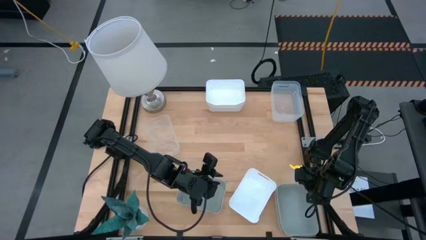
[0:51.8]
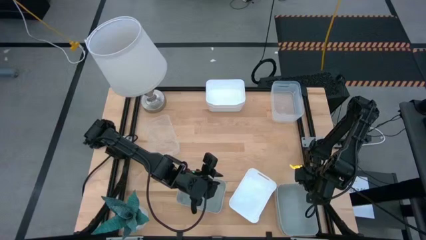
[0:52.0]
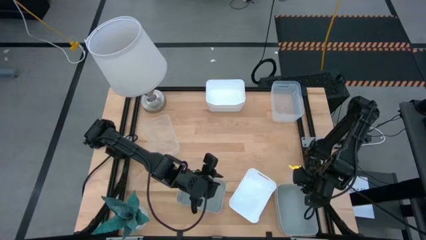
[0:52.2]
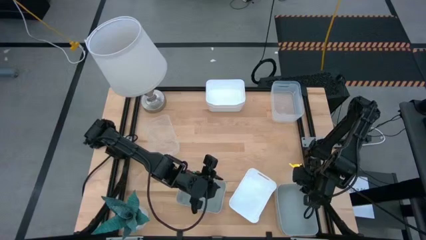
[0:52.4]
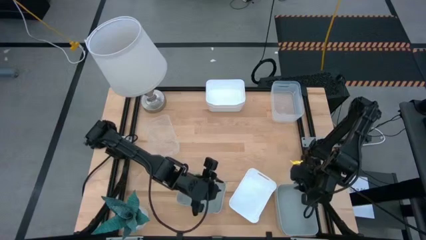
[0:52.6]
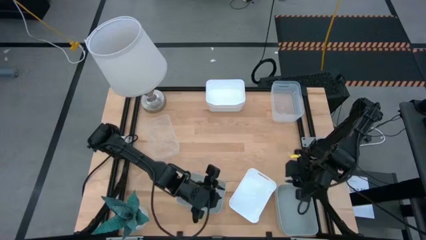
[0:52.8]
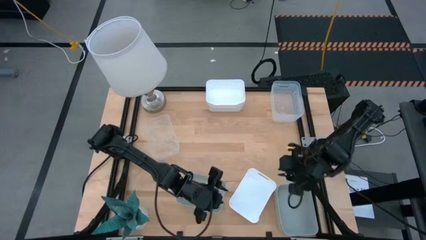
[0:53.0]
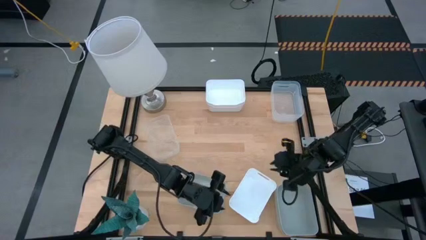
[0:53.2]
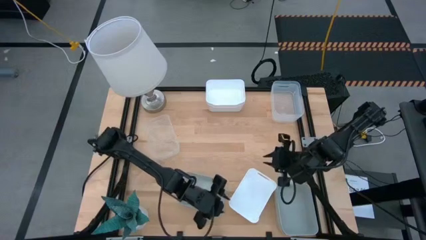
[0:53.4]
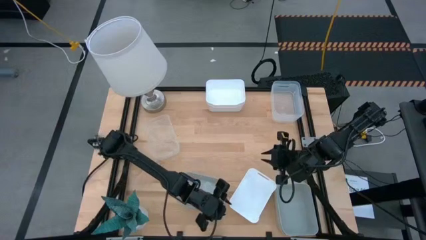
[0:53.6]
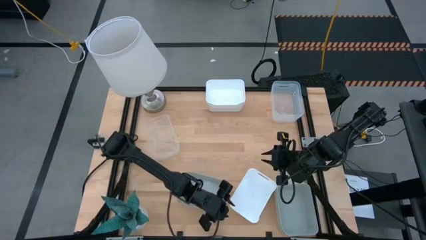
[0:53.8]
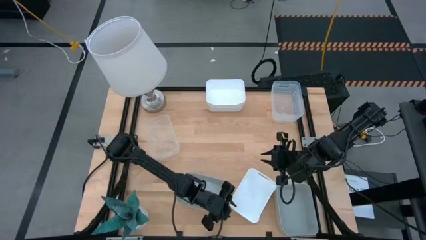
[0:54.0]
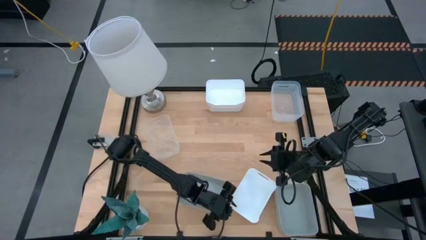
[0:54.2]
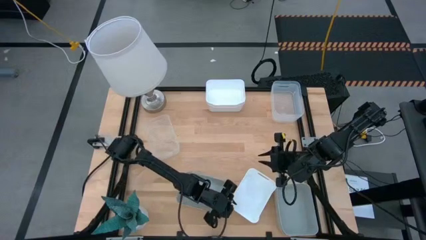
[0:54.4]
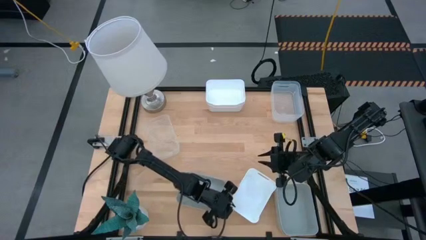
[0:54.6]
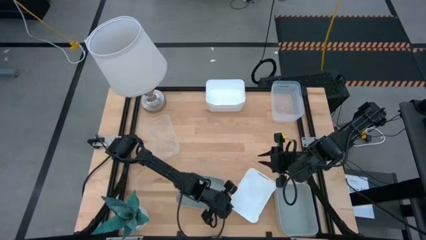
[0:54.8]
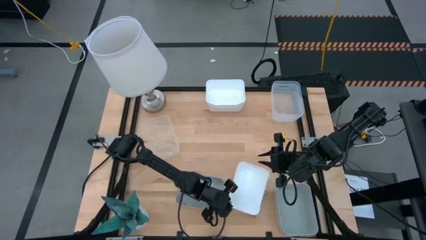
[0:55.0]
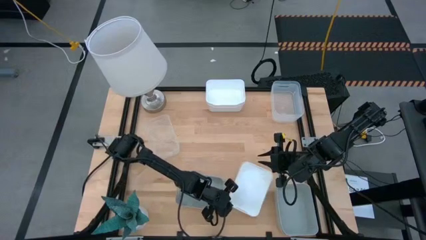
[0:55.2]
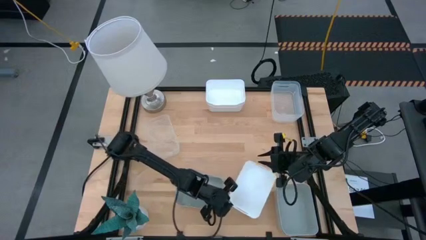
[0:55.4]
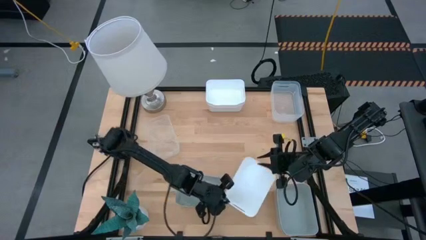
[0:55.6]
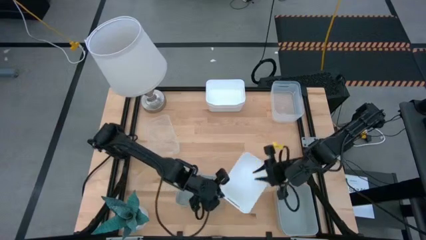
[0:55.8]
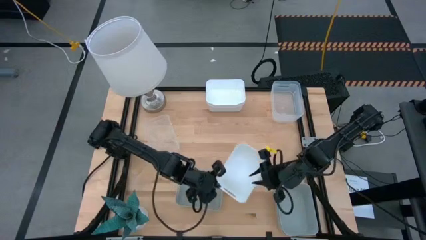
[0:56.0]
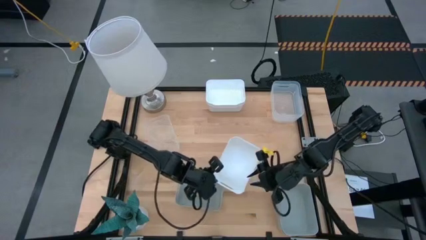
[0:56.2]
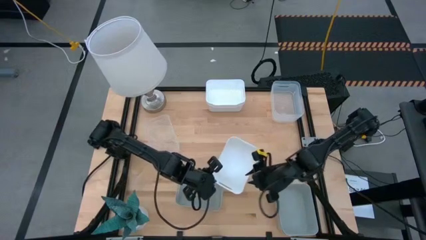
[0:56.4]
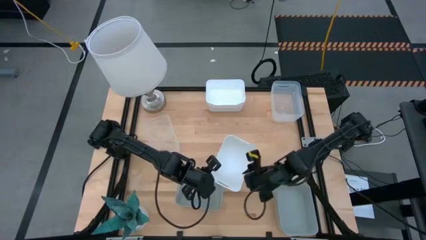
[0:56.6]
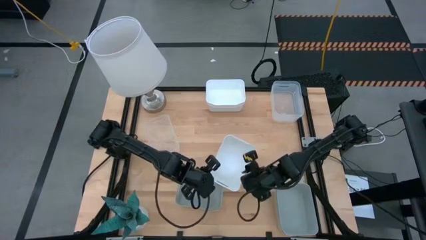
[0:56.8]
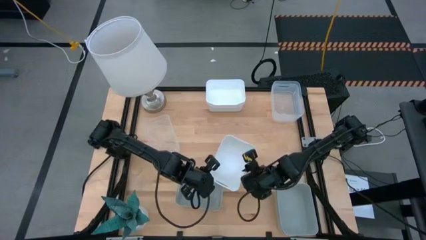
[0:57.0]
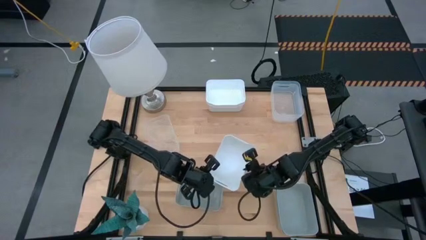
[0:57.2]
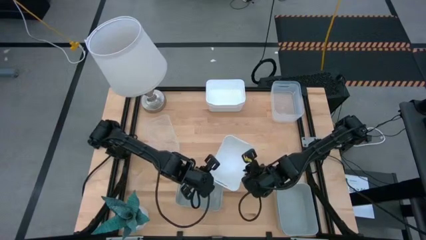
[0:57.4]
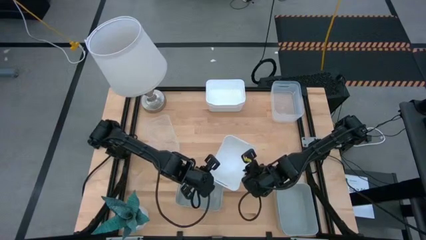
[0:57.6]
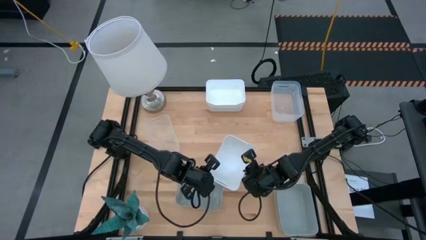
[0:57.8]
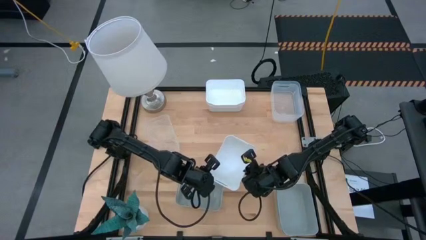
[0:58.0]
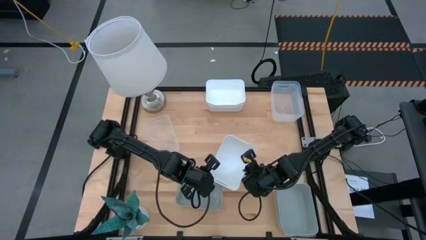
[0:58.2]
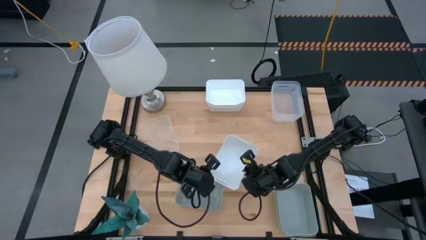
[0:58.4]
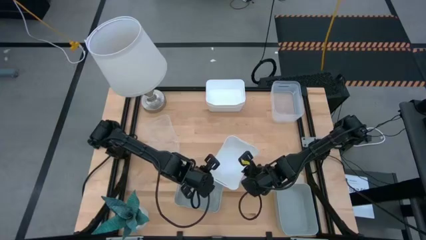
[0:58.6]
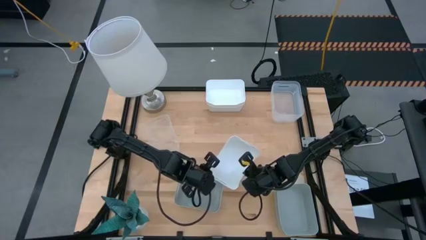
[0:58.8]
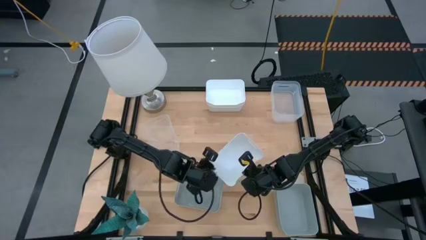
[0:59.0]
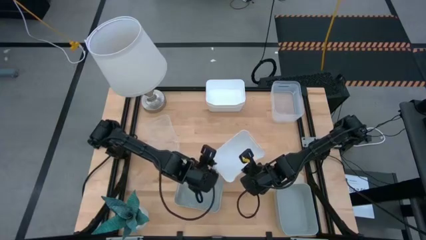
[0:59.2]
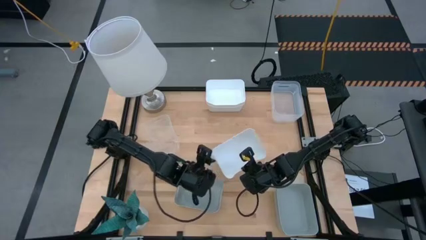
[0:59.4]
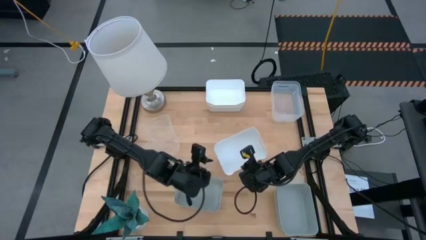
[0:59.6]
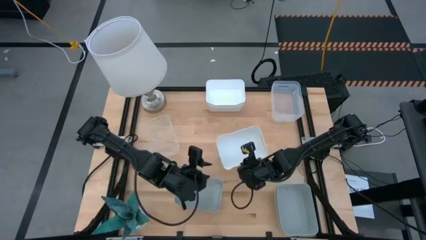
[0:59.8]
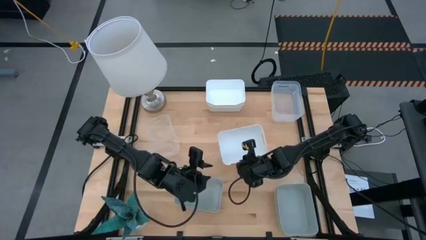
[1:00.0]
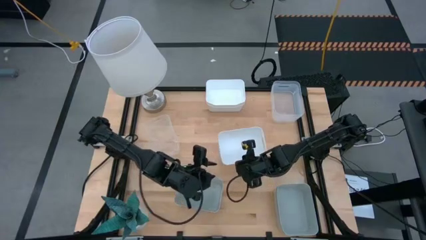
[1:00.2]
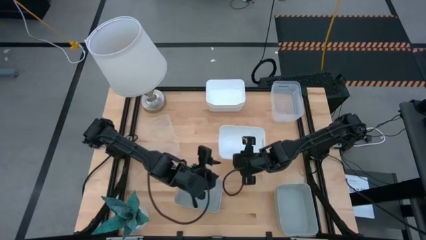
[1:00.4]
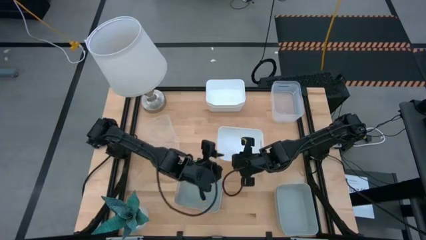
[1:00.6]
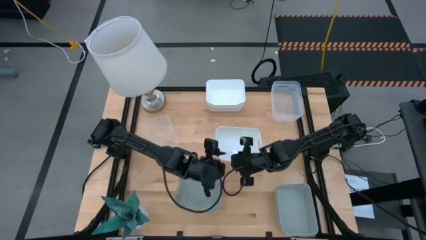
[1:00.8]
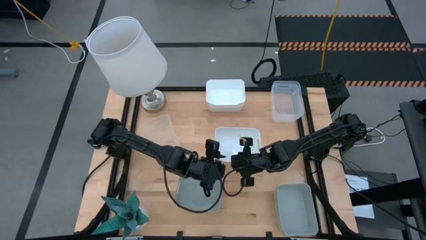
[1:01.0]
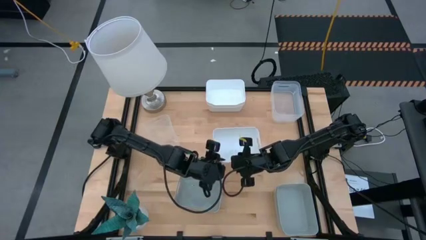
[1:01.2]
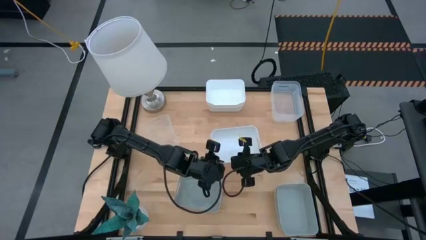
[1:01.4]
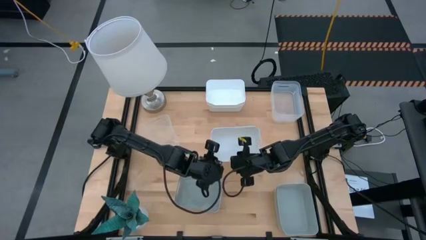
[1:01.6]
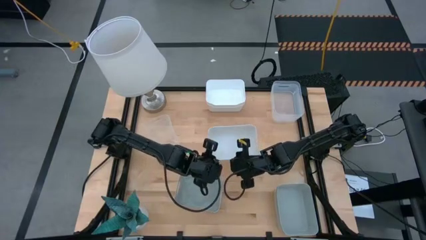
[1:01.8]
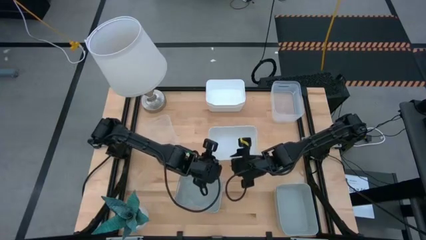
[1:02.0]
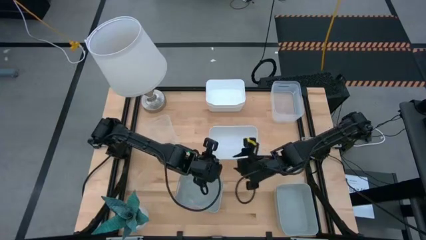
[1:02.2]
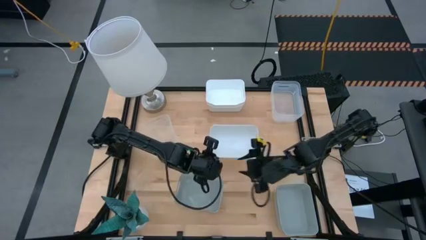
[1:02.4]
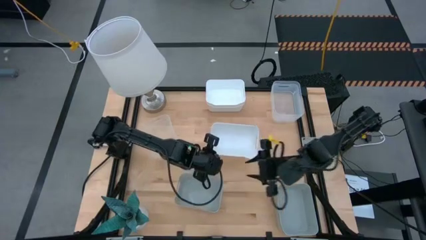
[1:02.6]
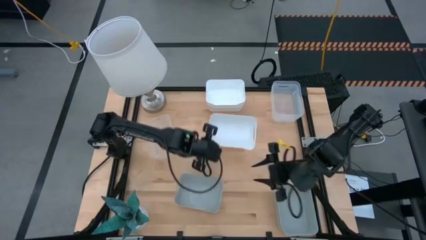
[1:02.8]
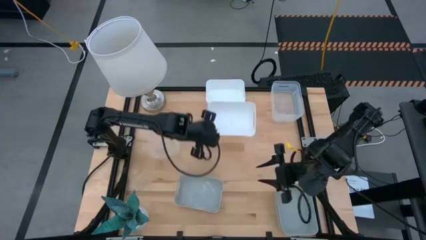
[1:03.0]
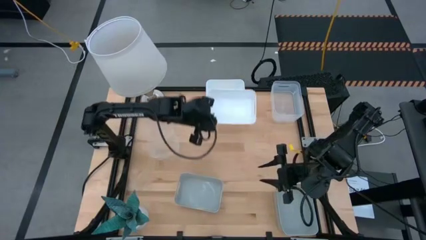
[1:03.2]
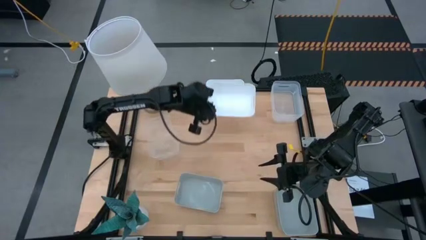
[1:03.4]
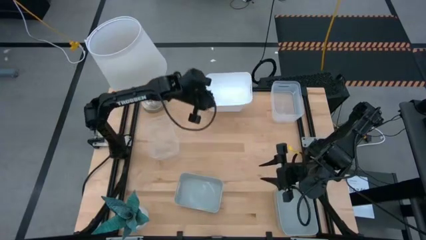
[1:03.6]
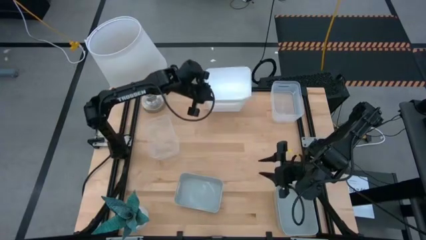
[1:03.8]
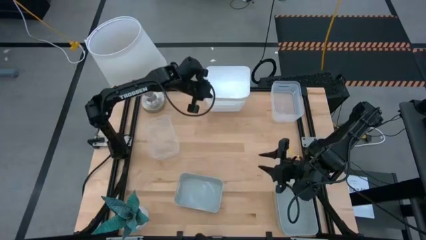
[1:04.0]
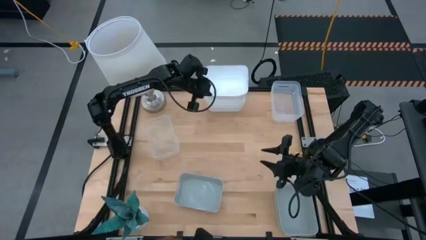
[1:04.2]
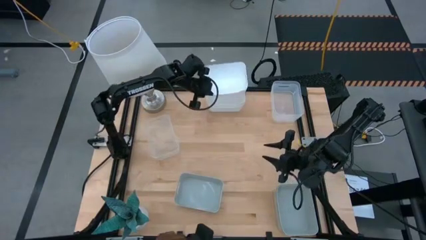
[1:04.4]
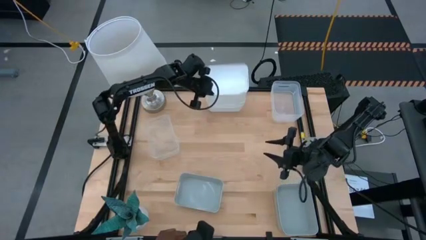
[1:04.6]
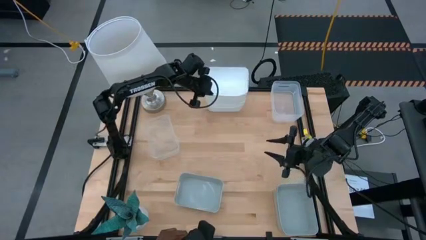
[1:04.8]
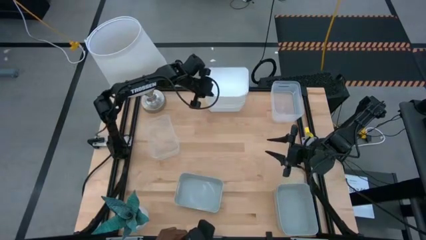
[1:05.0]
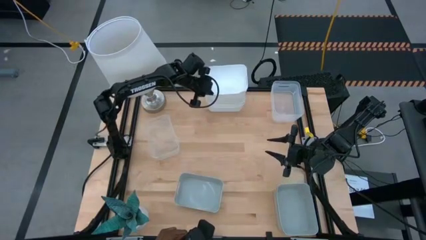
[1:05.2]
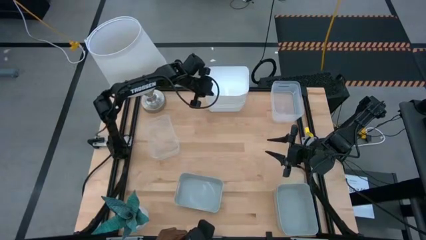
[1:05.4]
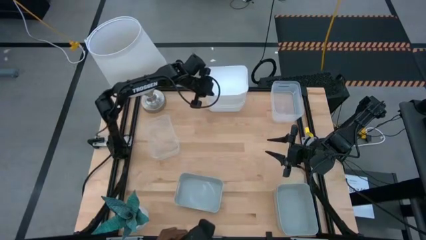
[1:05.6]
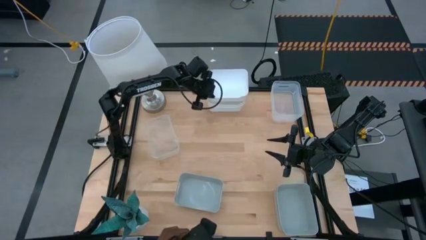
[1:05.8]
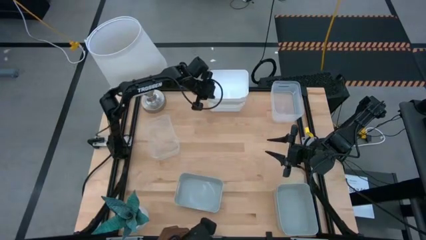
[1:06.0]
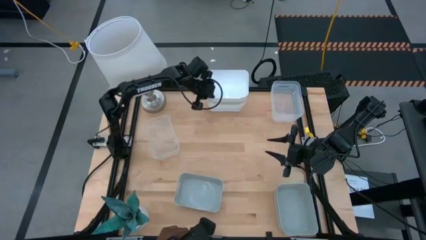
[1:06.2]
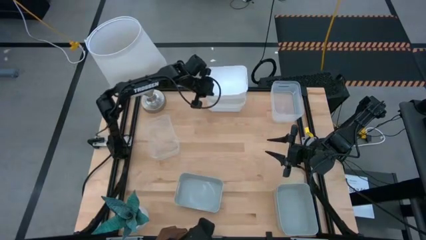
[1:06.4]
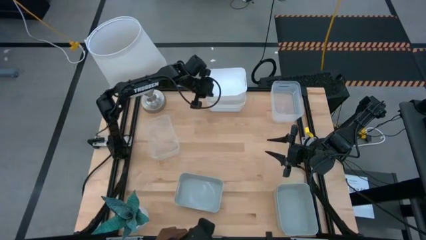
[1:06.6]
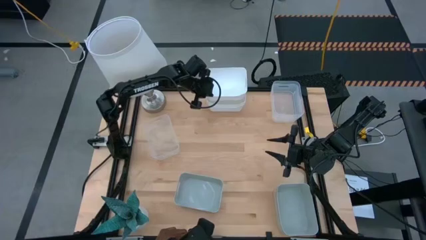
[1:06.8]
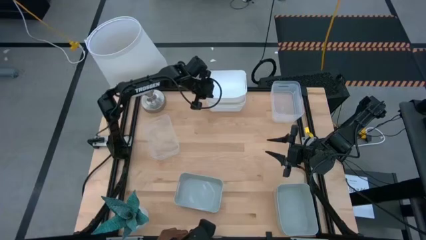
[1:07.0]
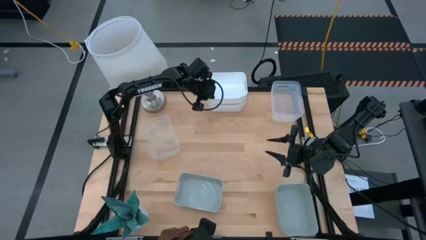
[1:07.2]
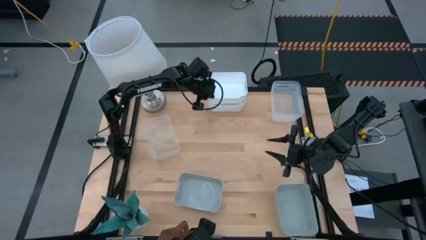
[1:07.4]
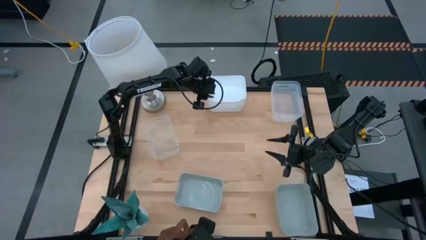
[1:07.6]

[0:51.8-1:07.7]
Stack the bottom white bin on the white bins
